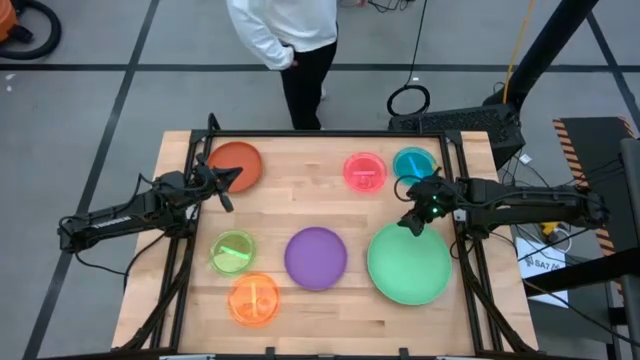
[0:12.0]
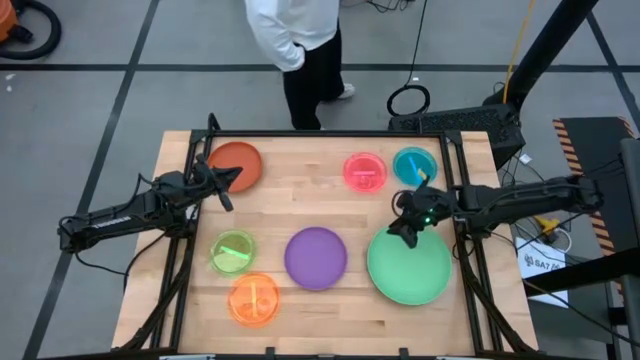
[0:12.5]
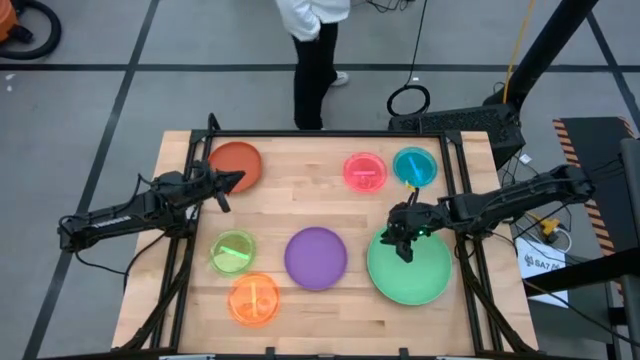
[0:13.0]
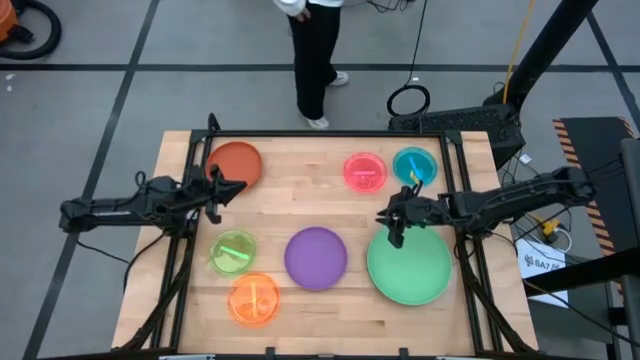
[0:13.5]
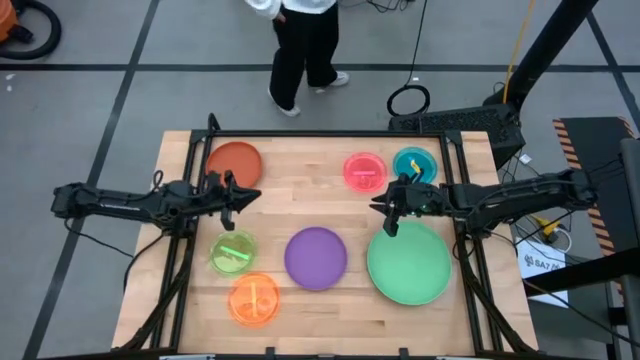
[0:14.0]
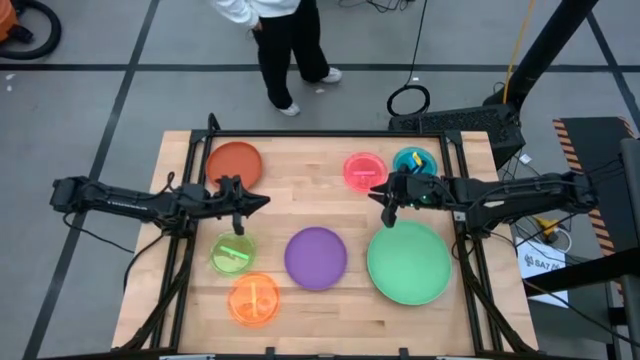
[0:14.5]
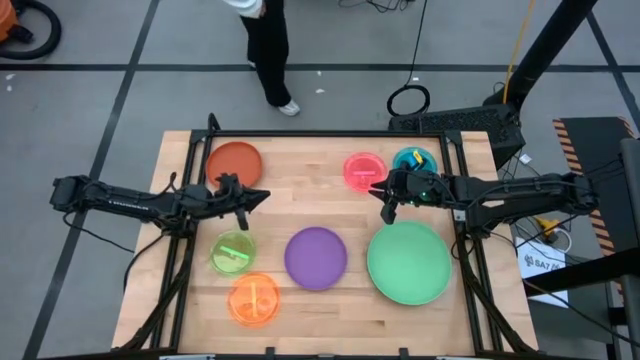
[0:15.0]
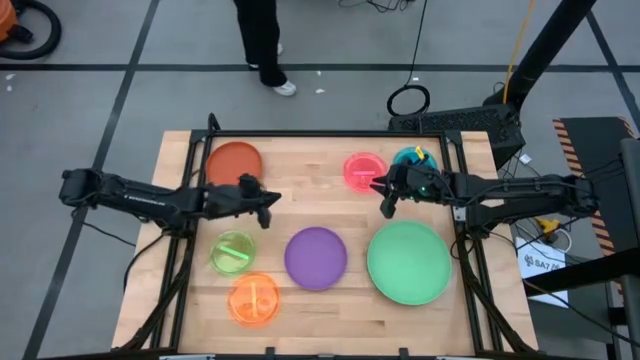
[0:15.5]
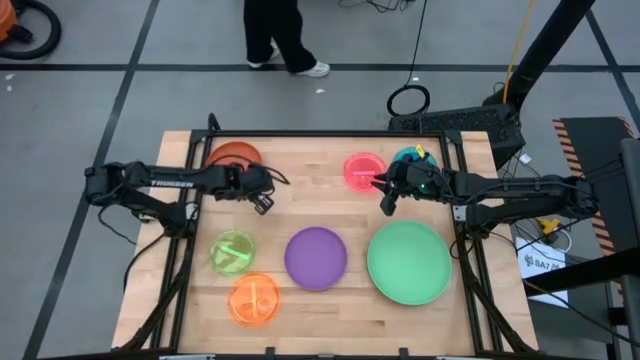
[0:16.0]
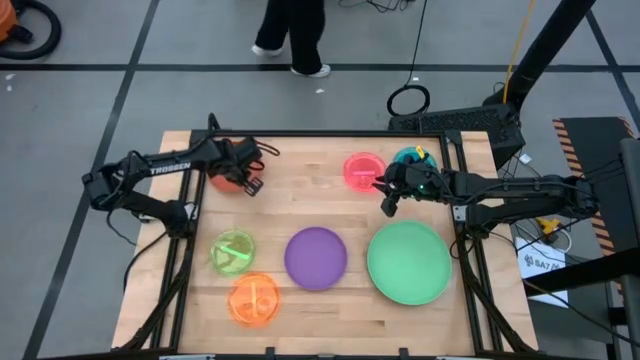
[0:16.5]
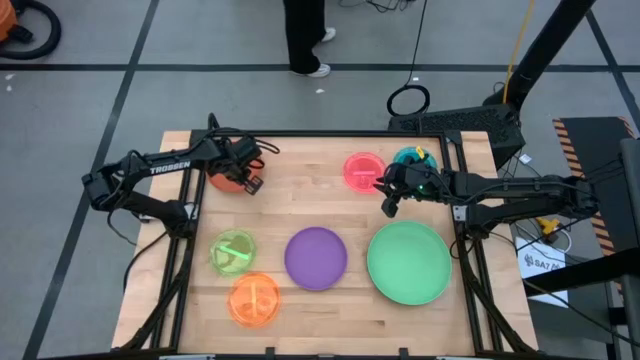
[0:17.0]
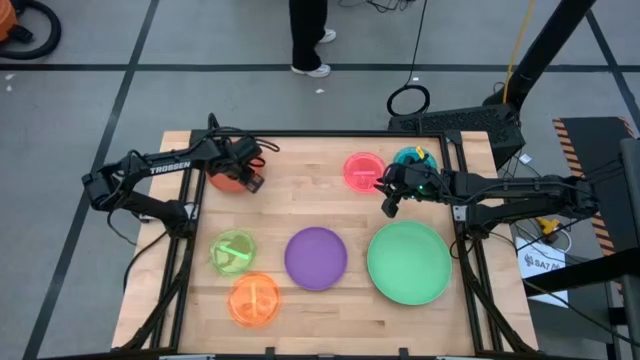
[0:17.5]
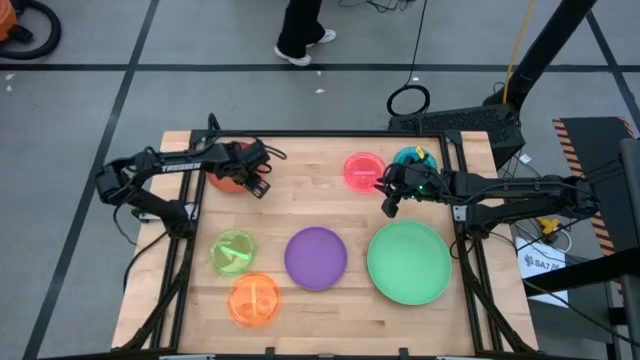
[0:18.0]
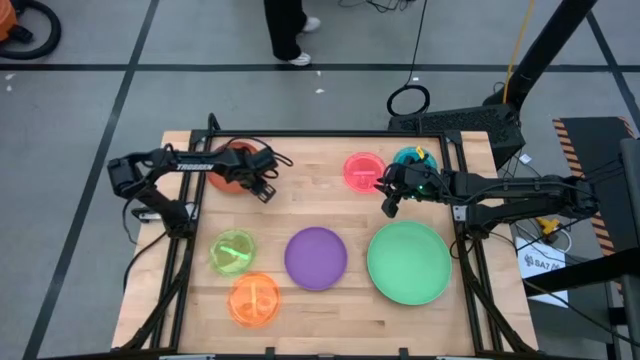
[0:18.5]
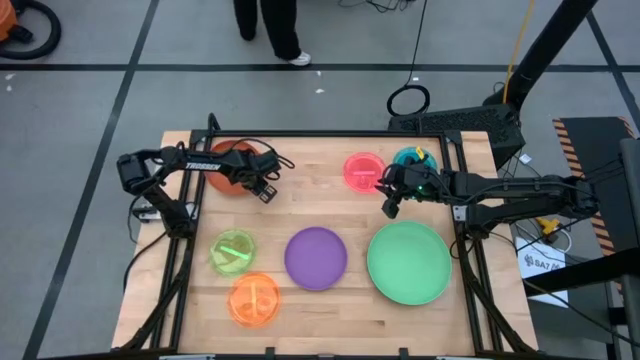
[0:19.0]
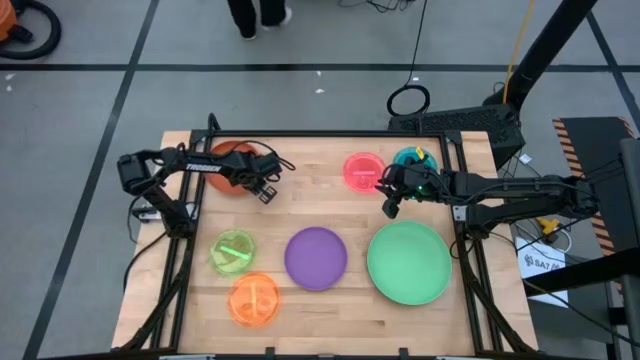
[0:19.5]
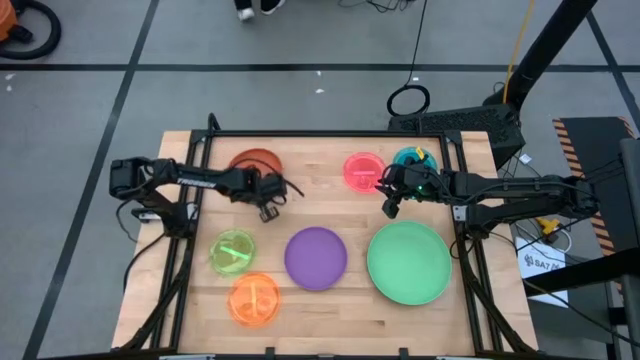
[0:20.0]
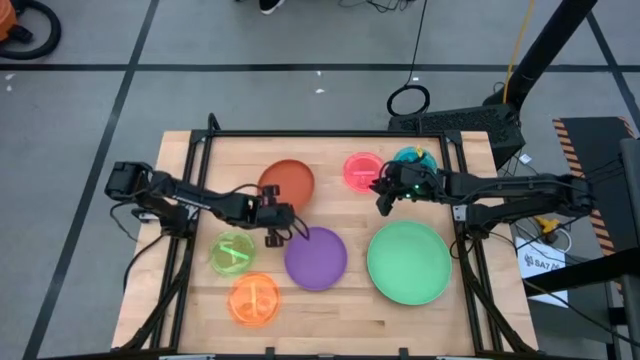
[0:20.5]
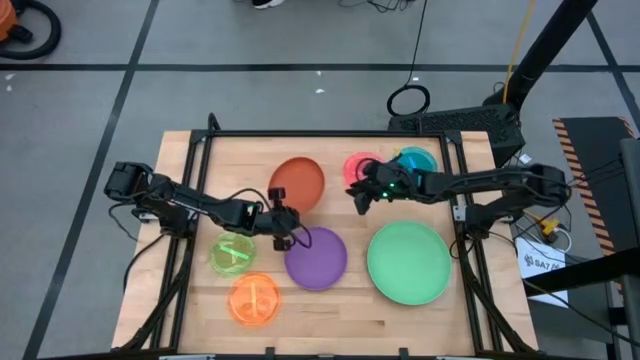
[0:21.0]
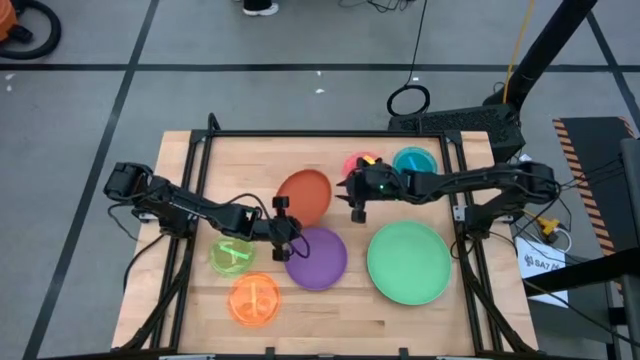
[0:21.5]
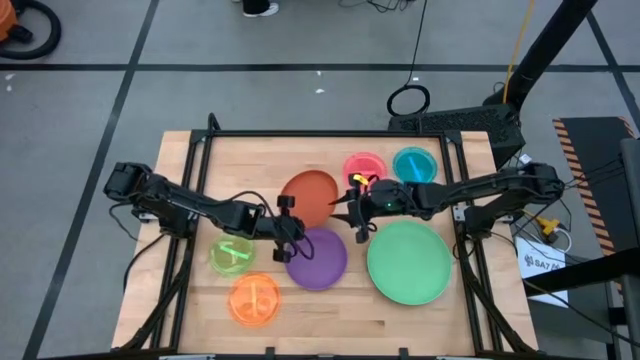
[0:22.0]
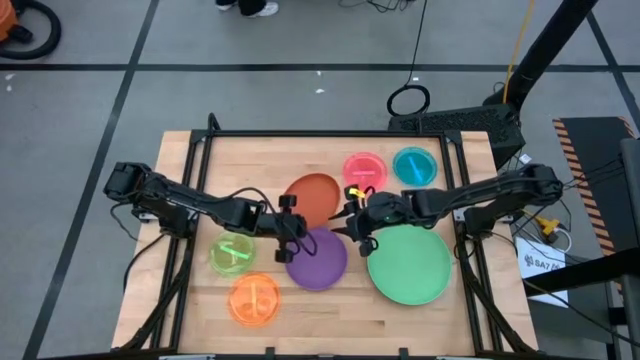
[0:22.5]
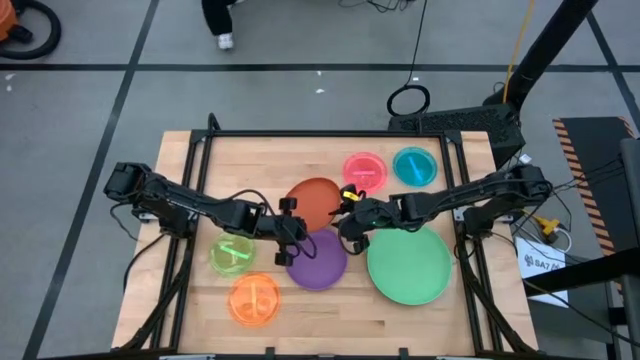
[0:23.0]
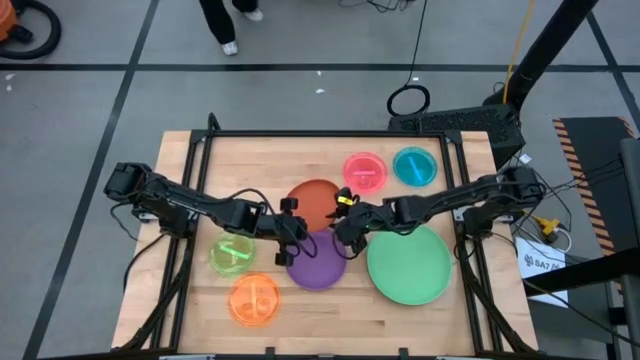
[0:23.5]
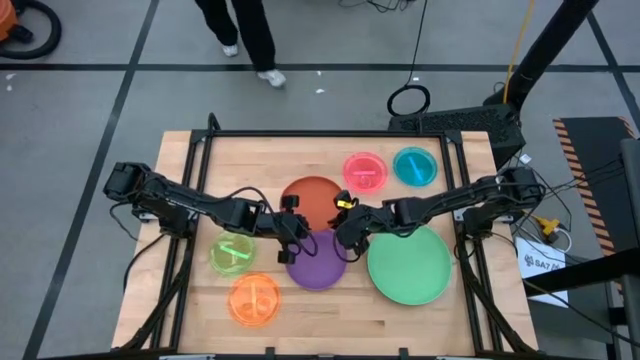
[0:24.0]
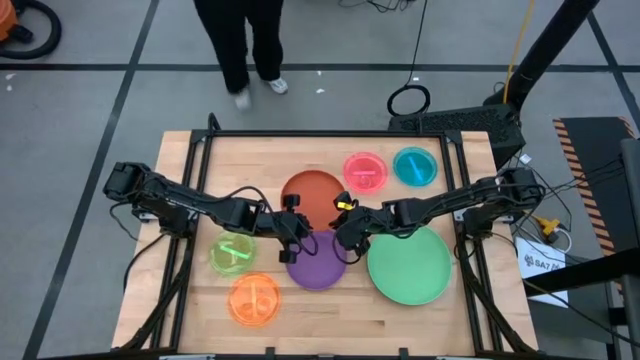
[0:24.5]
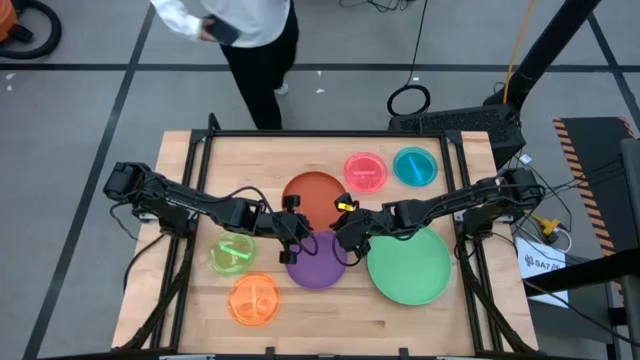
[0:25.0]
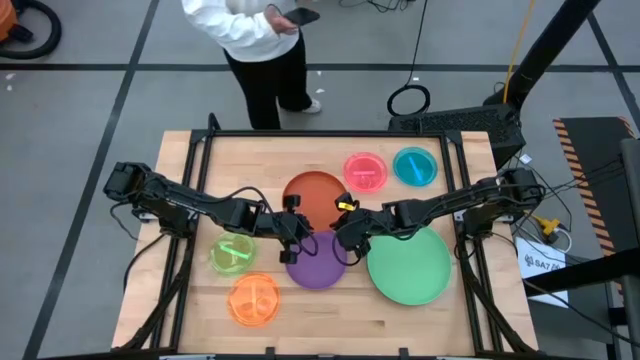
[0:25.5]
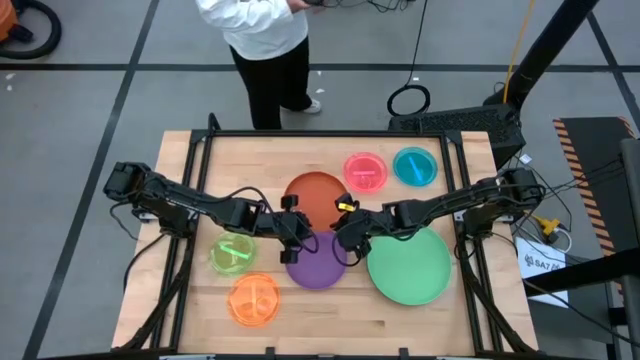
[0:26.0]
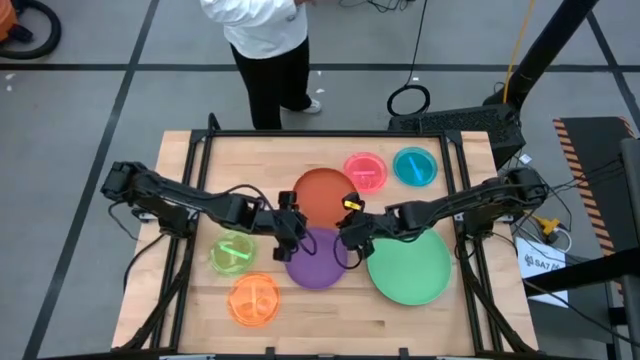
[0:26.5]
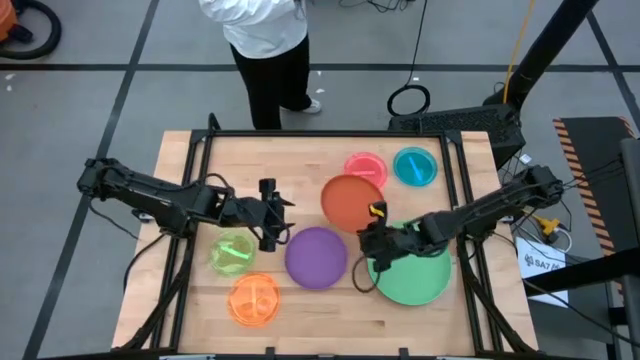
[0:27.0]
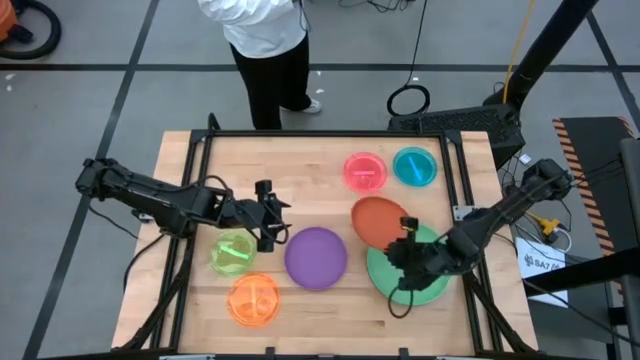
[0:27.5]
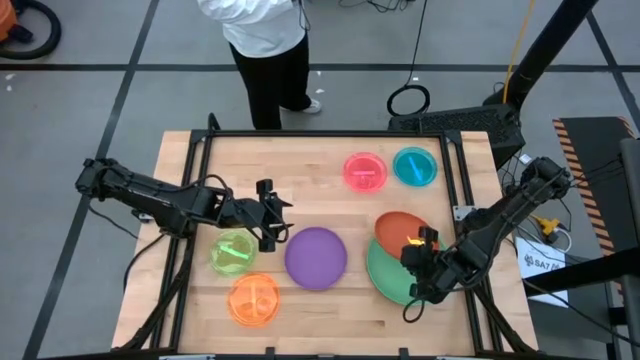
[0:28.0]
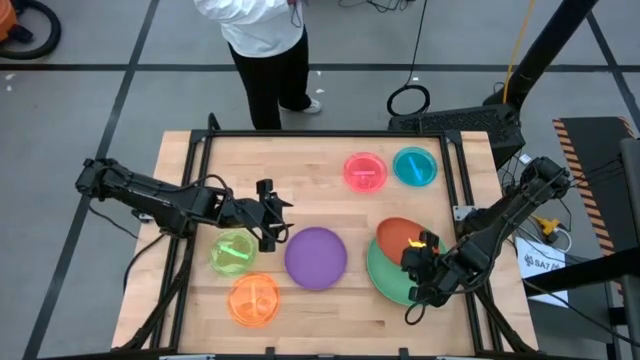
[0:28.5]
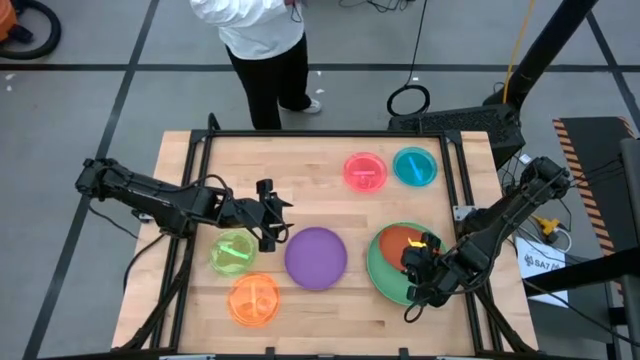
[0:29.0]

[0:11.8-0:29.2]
Task: Stack plastic plates
Stack the orange plate on top of the light green plate

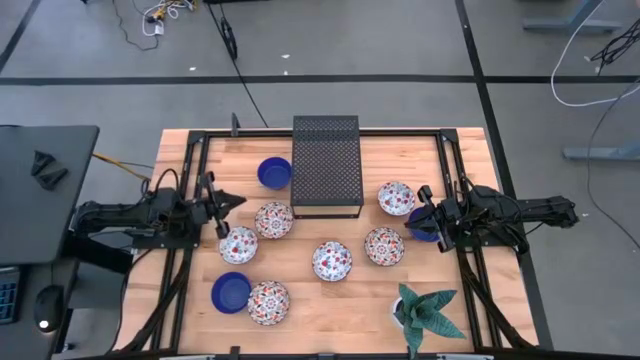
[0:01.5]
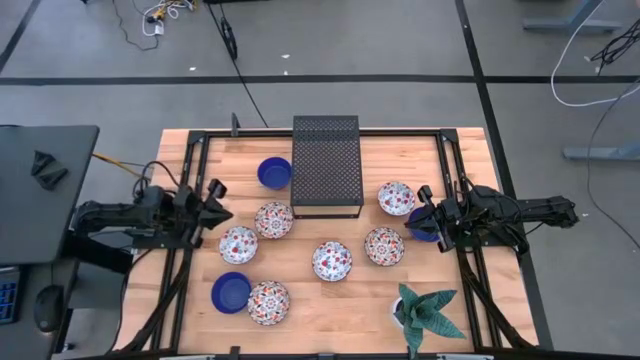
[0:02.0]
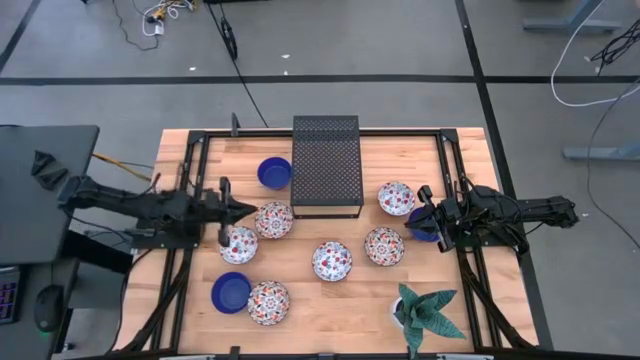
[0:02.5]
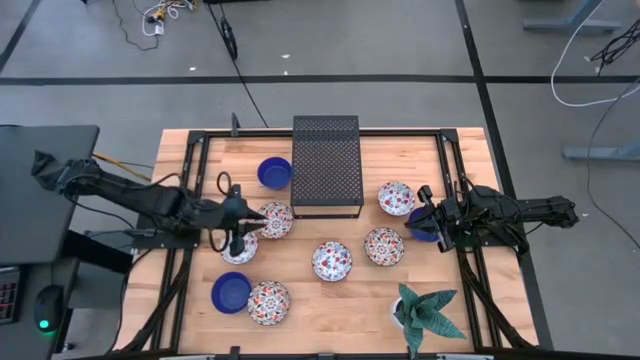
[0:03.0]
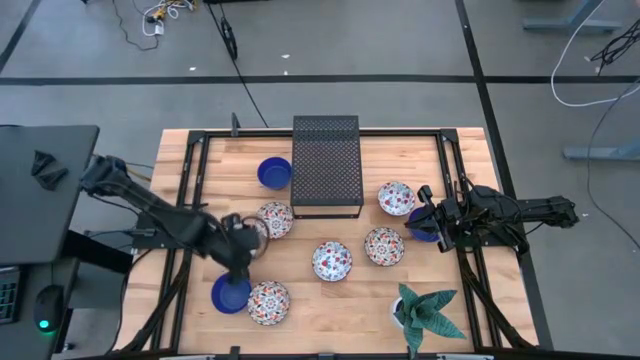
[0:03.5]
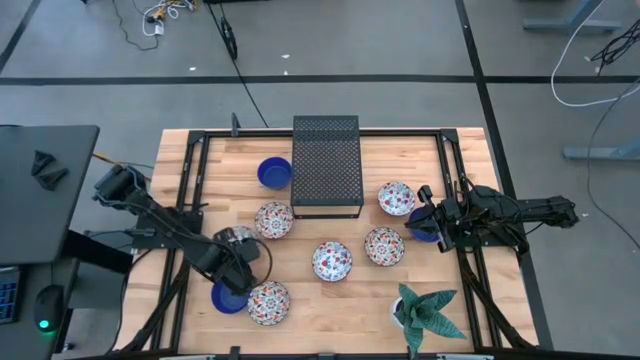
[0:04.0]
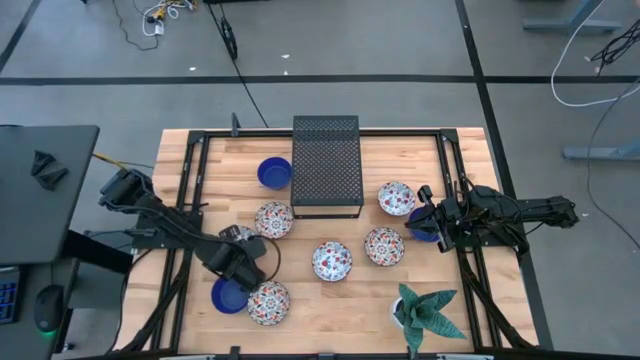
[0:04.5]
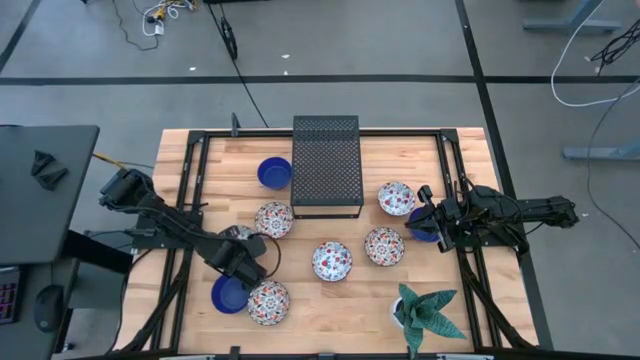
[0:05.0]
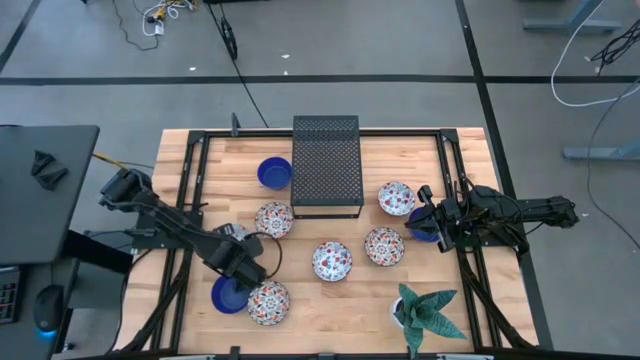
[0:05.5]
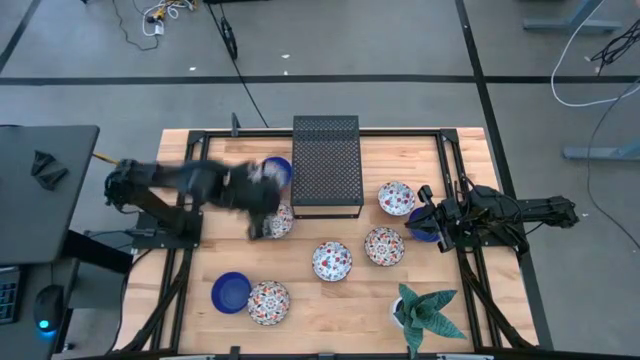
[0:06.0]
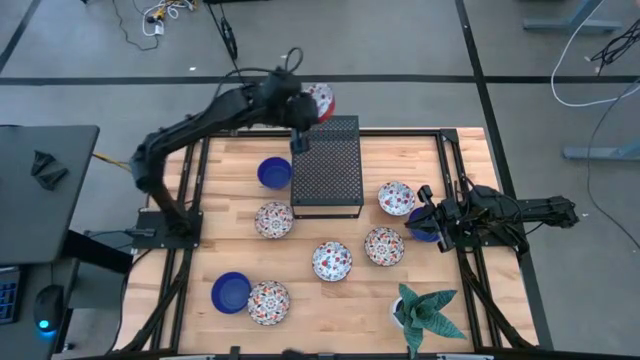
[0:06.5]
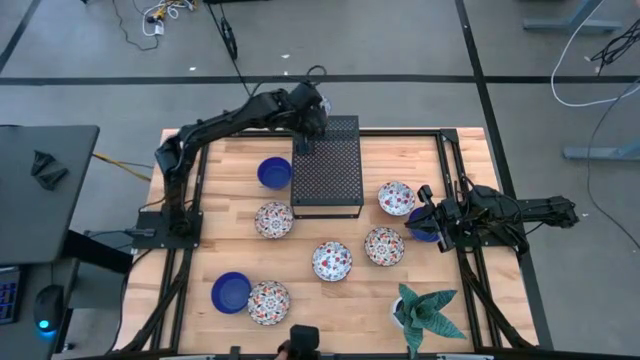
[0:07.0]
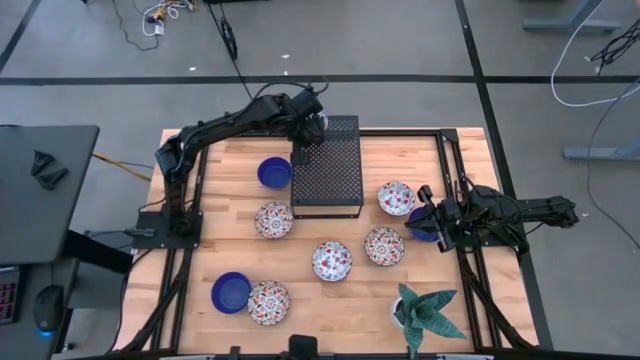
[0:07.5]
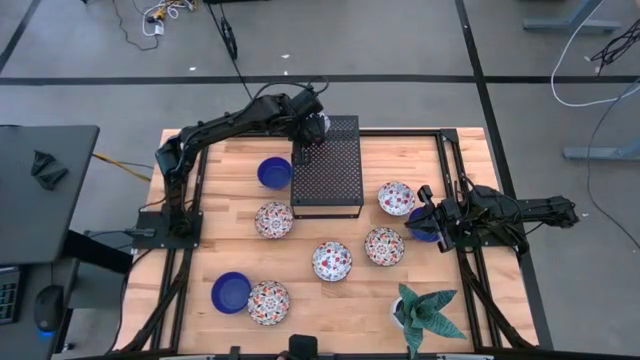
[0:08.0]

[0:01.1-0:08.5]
Task: Pick & Place Mini bowls
Put the left red patterned bowl on the shelf
